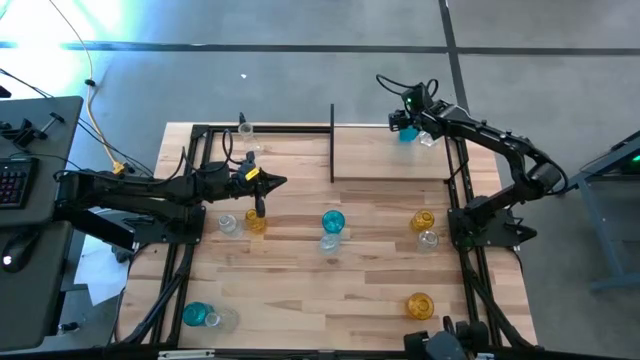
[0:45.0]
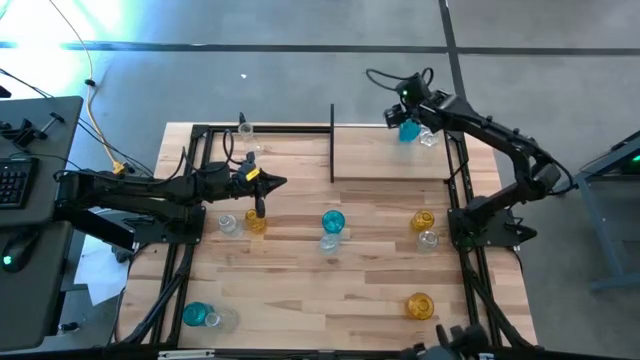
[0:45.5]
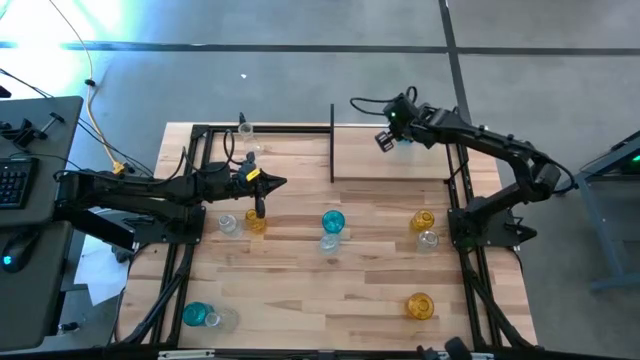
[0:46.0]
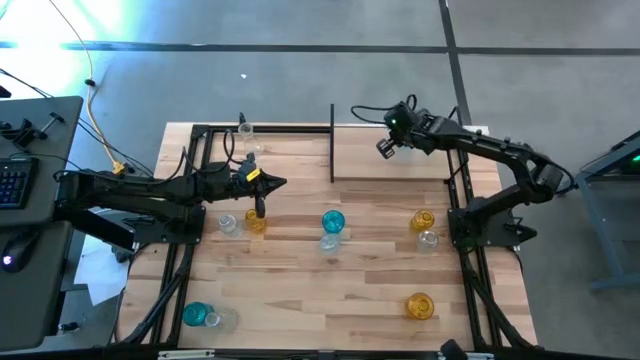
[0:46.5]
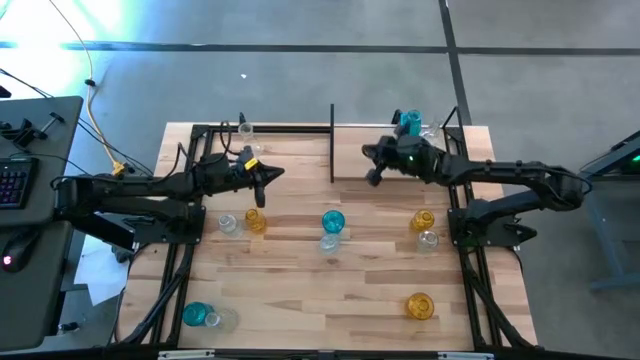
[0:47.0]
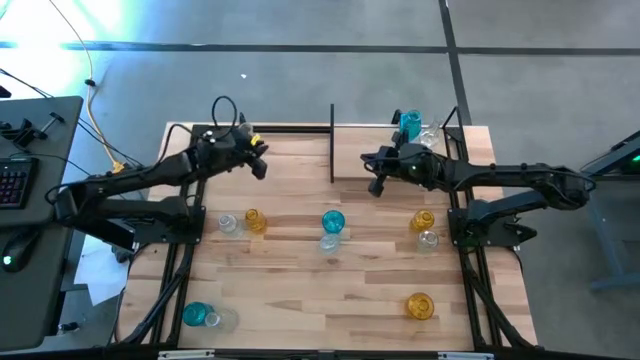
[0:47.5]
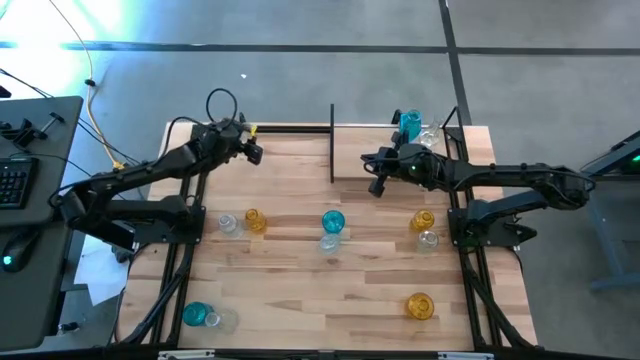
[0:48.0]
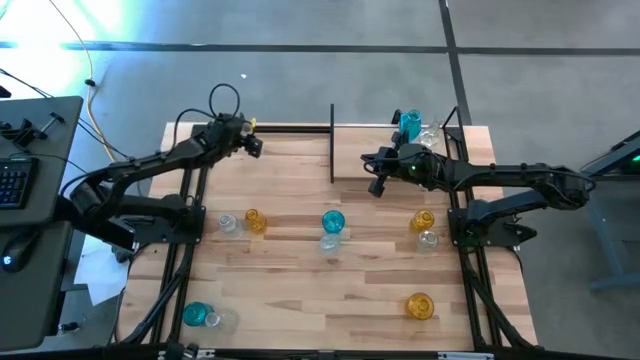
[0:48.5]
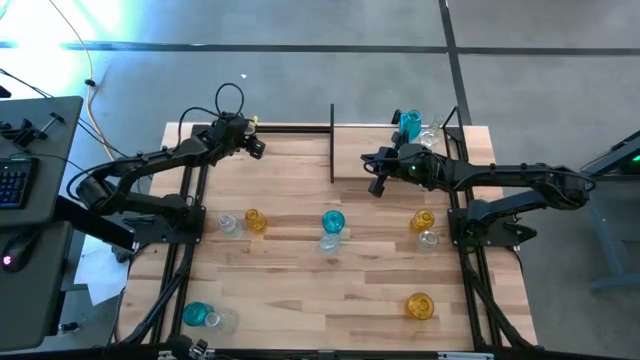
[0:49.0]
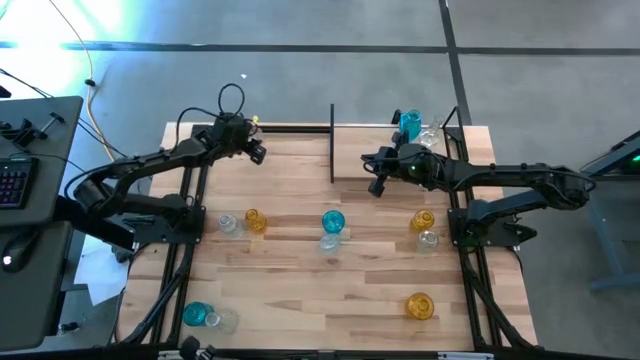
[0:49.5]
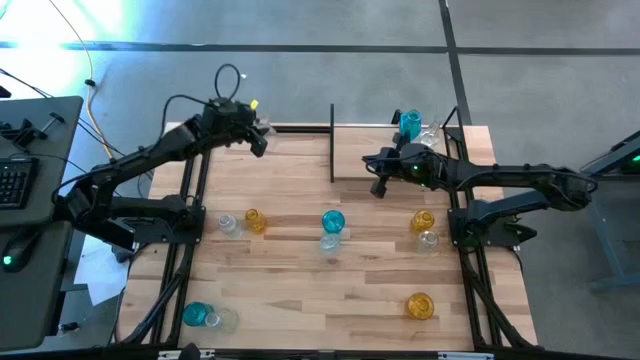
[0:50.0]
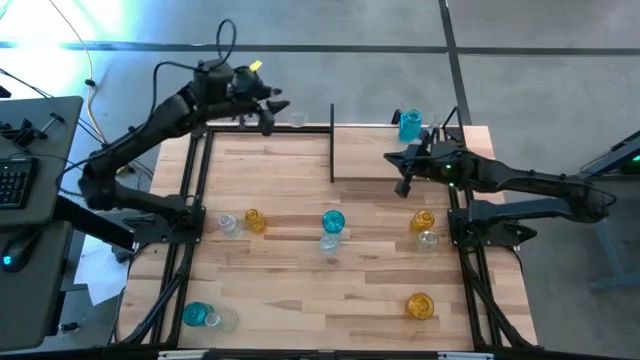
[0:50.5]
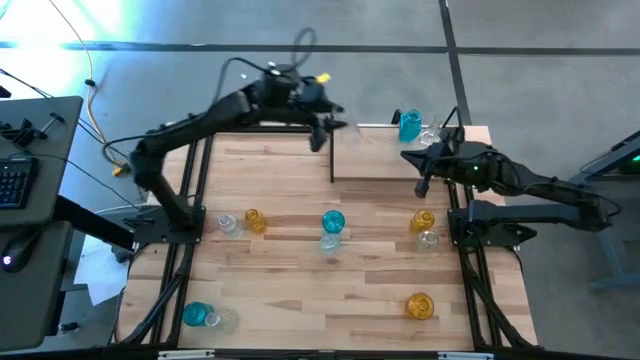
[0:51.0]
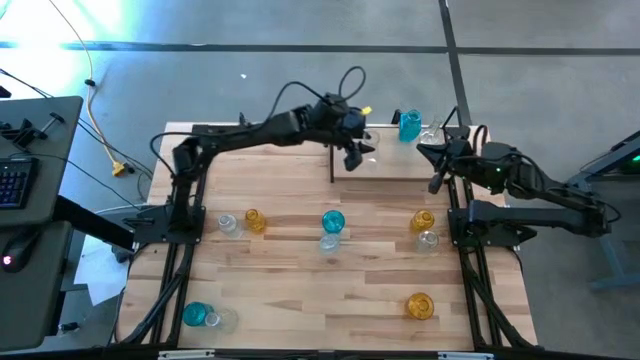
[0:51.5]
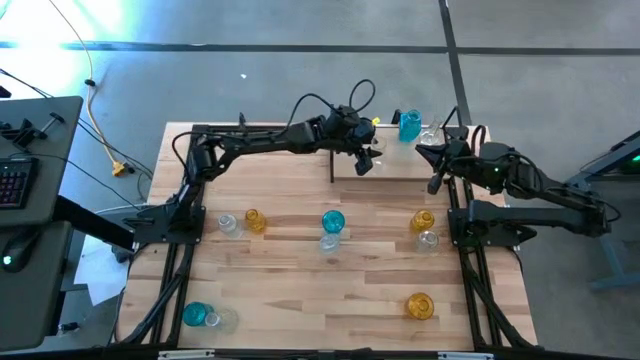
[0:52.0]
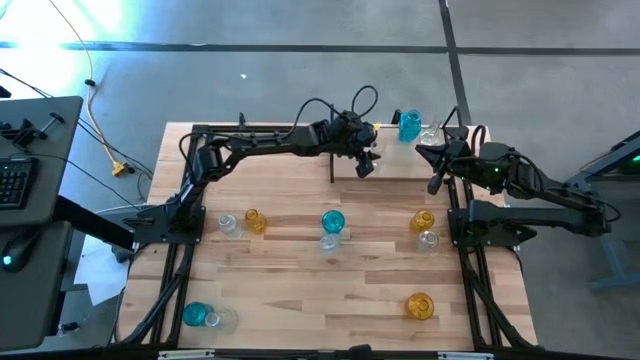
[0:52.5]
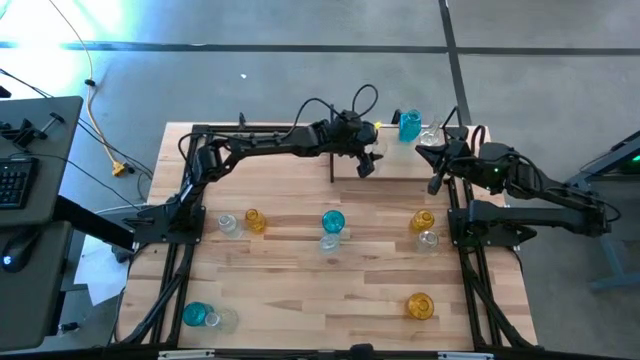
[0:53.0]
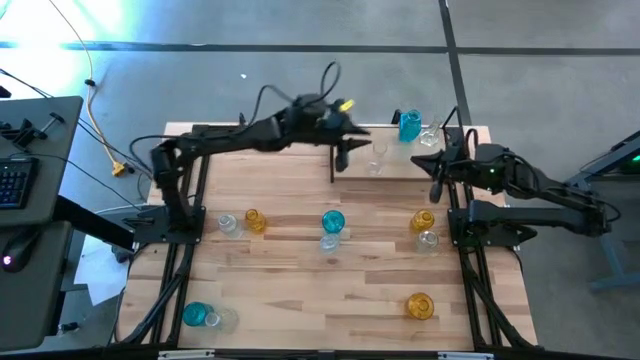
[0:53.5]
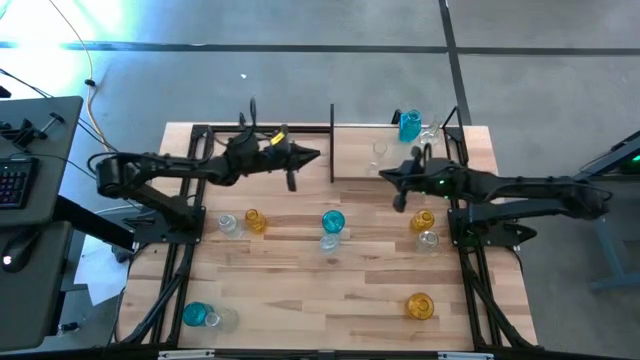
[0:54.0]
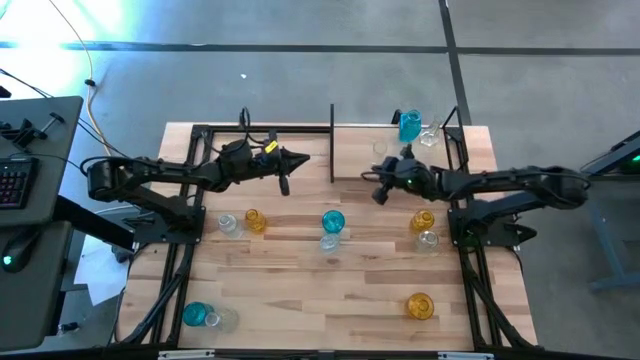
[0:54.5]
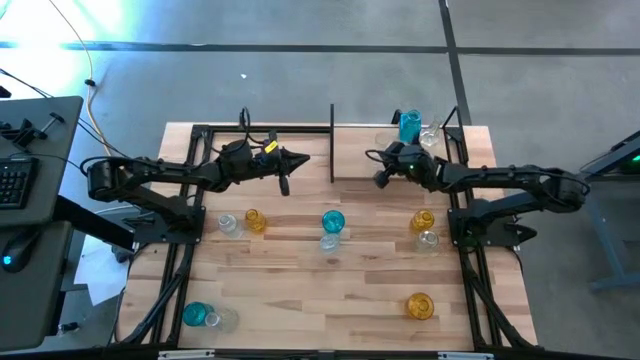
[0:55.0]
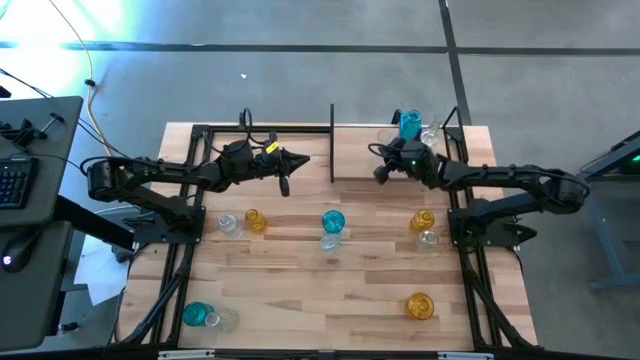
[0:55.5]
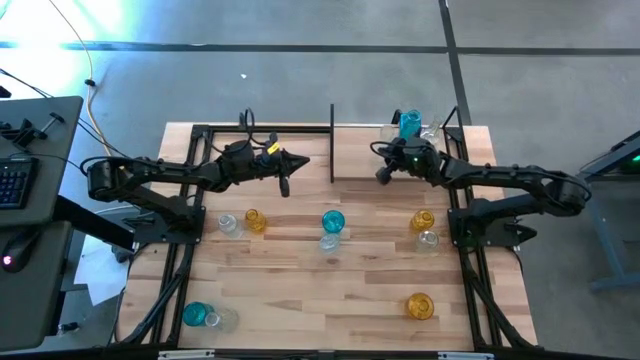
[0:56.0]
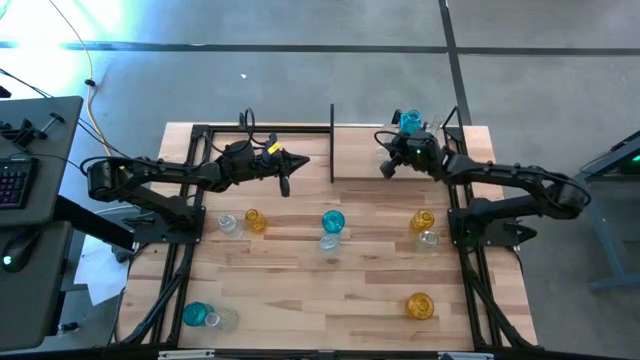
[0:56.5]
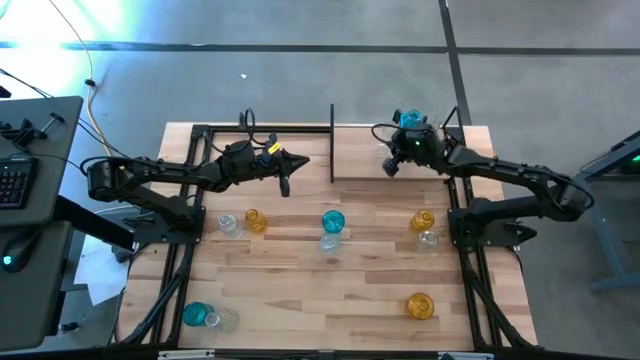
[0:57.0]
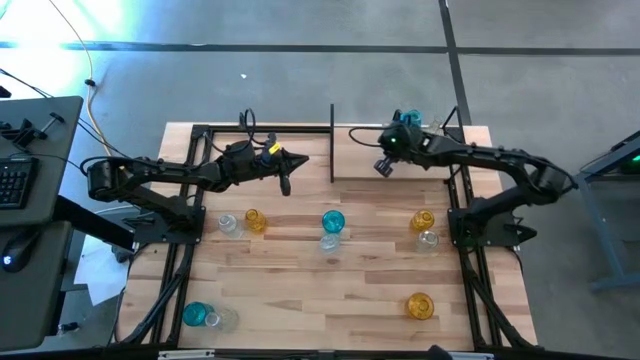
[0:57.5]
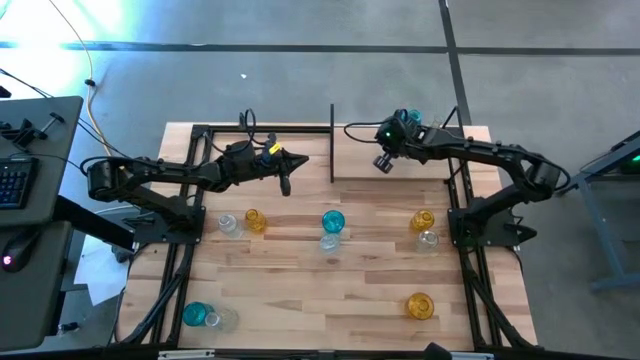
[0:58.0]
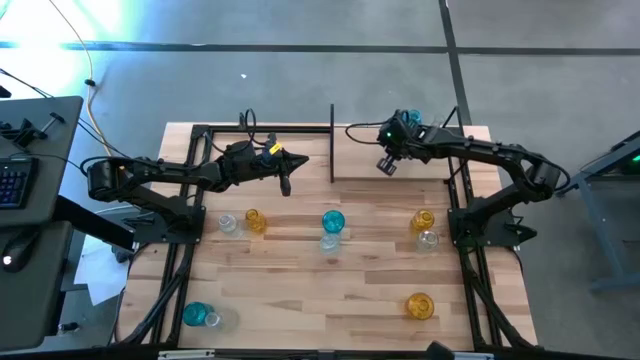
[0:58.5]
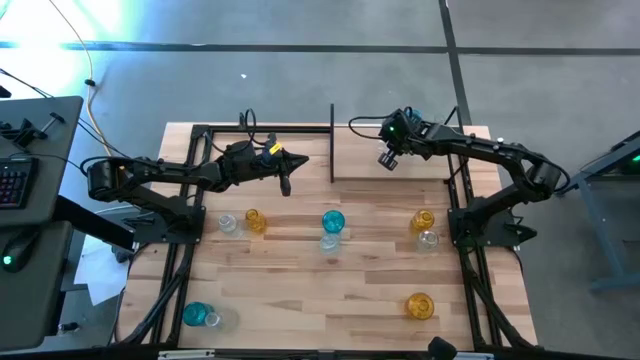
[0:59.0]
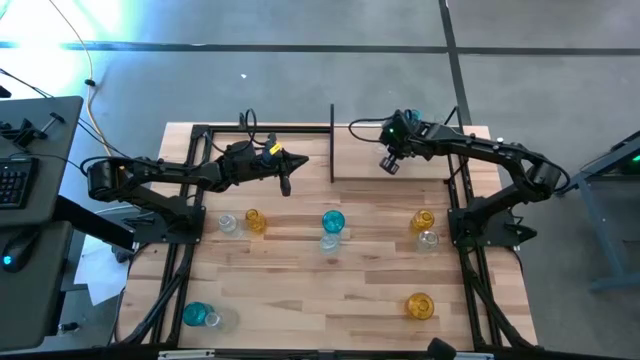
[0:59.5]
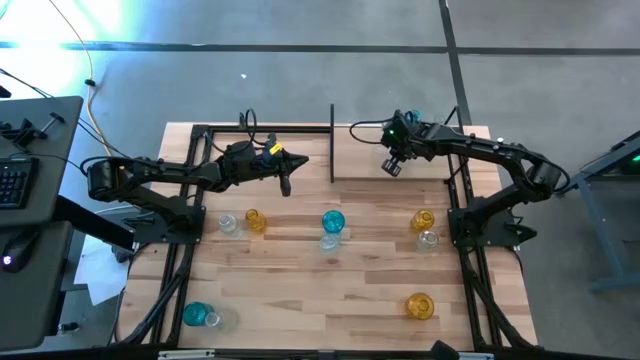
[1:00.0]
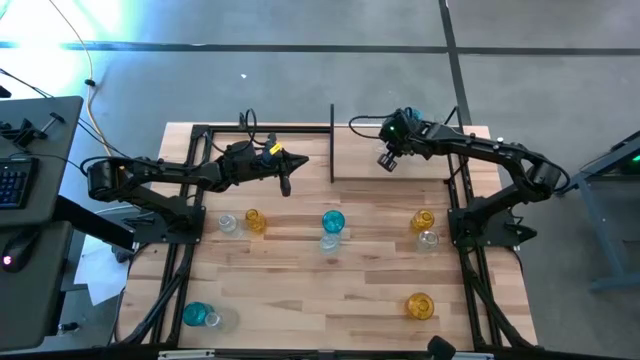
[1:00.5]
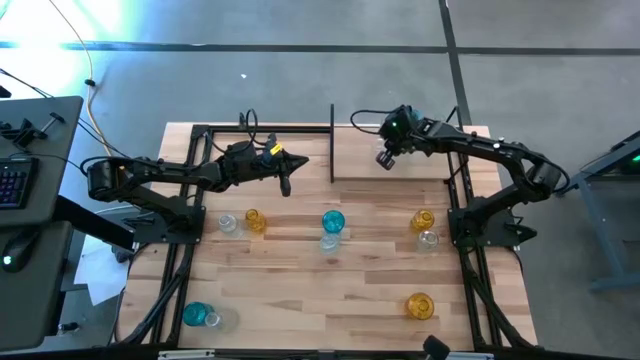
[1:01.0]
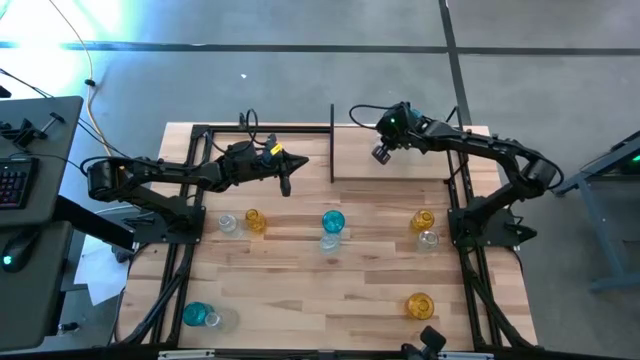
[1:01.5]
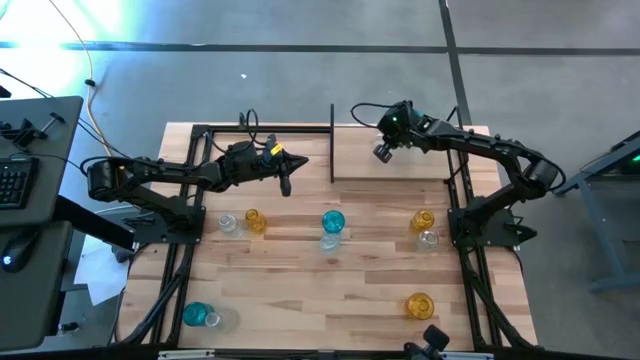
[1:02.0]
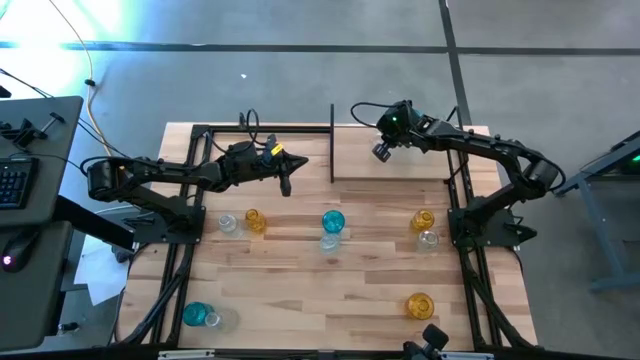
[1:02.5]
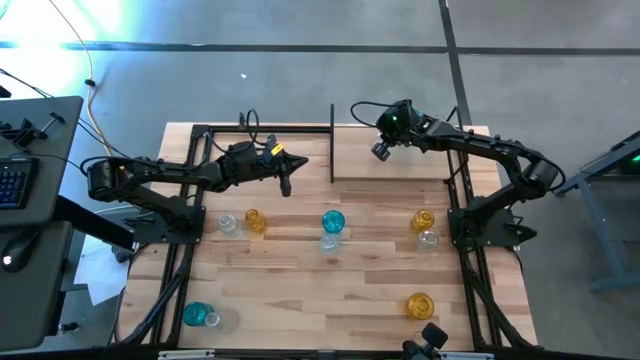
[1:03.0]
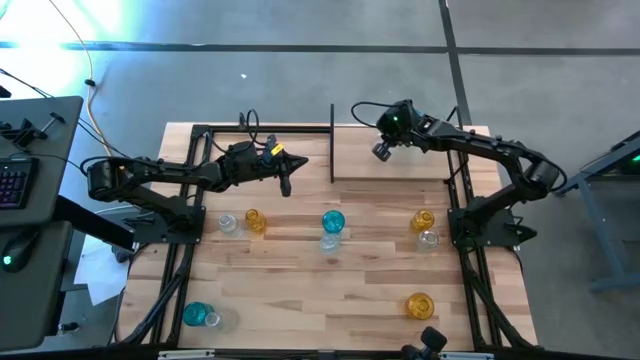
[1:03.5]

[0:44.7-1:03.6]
Task: sort vases onto shelf
Put the transparent vase on the shelf
